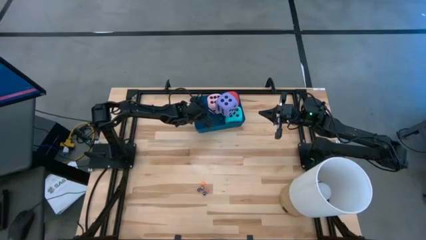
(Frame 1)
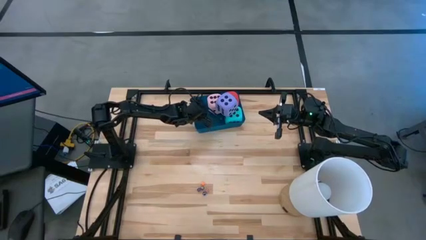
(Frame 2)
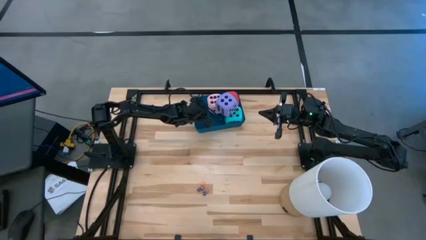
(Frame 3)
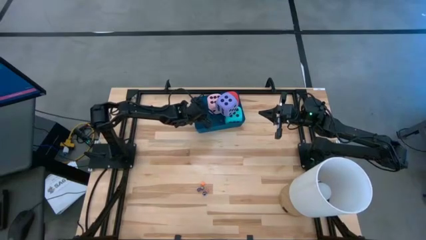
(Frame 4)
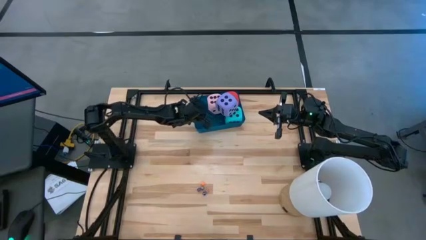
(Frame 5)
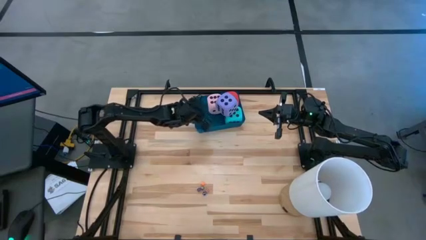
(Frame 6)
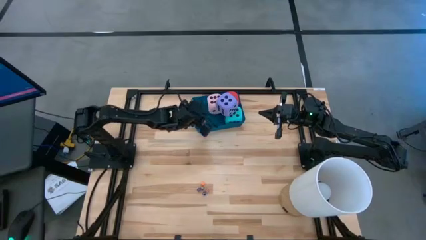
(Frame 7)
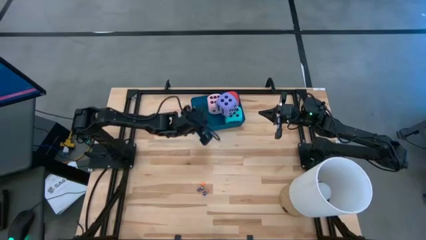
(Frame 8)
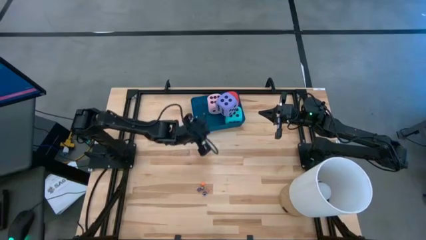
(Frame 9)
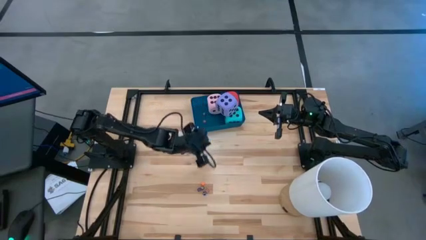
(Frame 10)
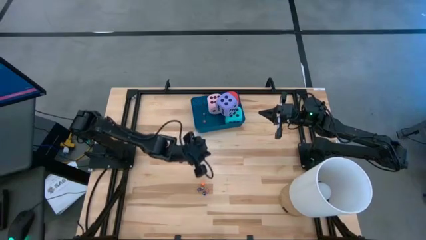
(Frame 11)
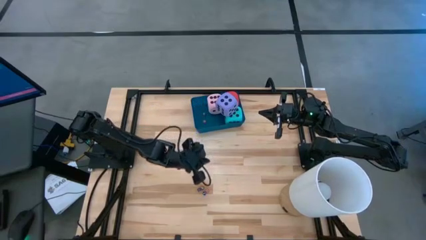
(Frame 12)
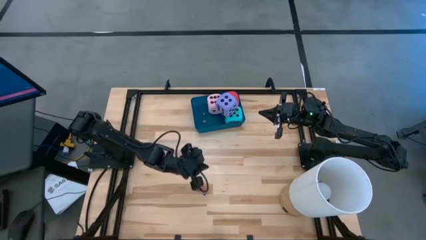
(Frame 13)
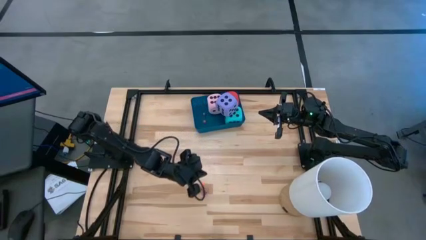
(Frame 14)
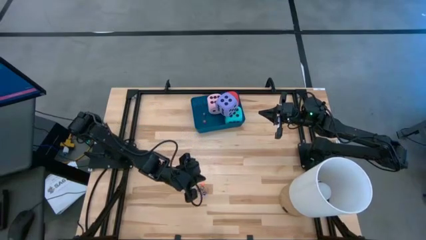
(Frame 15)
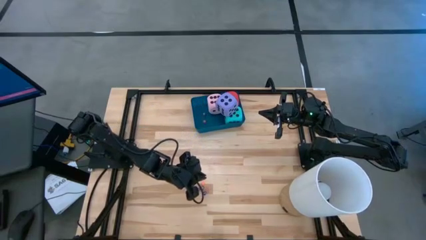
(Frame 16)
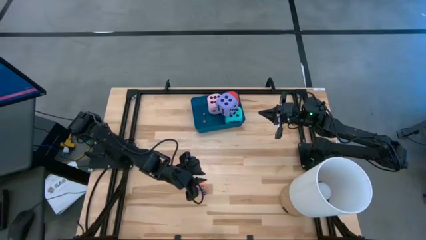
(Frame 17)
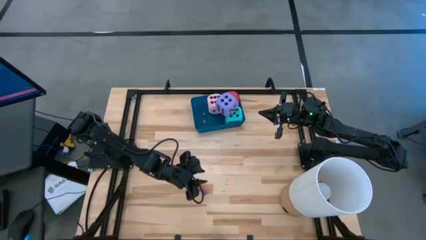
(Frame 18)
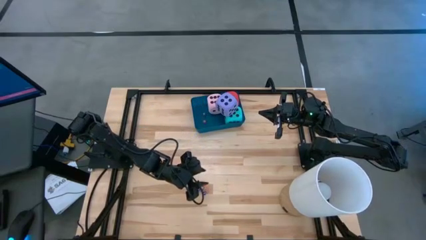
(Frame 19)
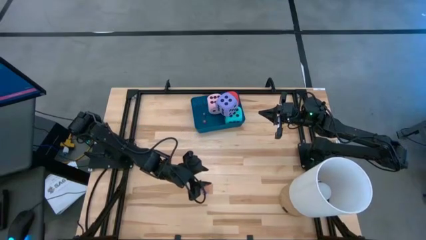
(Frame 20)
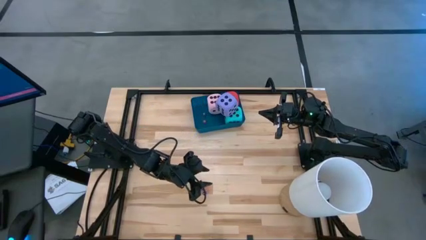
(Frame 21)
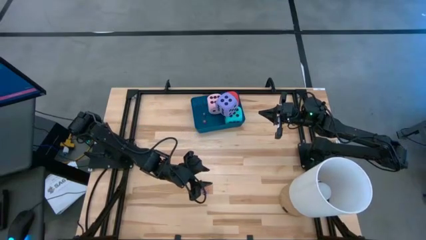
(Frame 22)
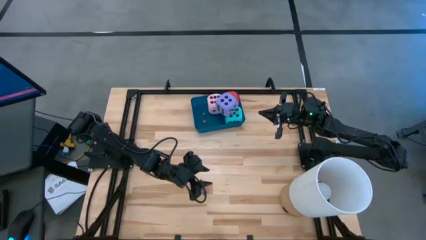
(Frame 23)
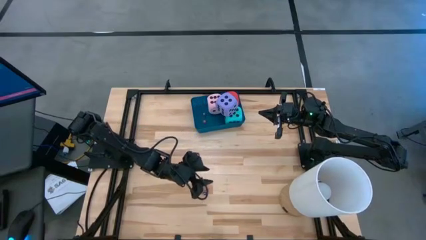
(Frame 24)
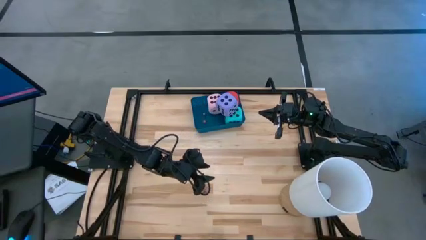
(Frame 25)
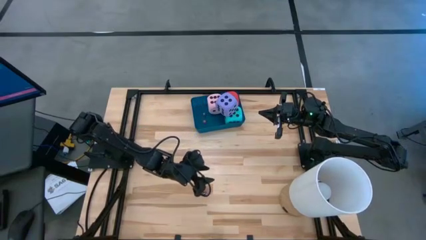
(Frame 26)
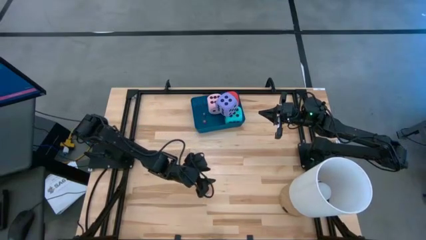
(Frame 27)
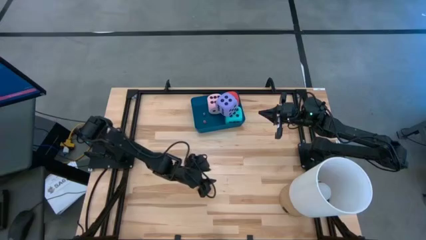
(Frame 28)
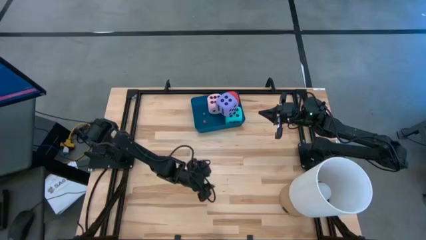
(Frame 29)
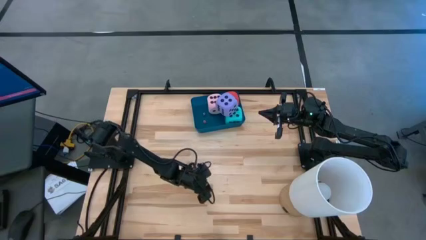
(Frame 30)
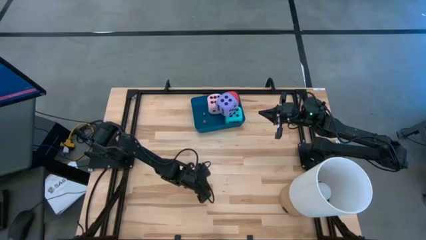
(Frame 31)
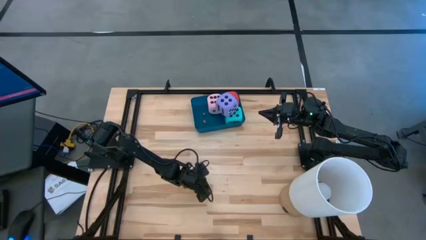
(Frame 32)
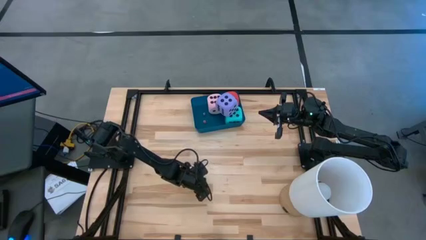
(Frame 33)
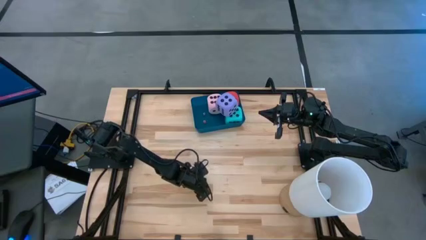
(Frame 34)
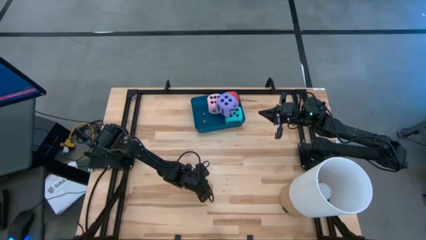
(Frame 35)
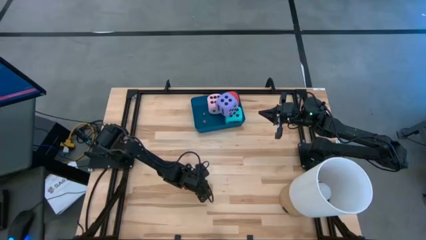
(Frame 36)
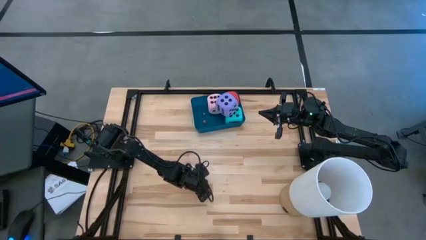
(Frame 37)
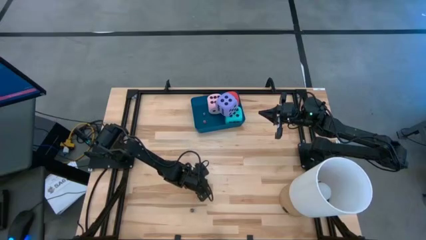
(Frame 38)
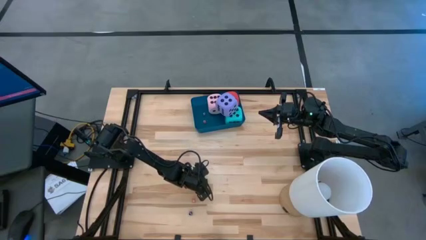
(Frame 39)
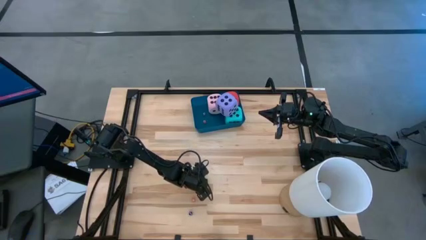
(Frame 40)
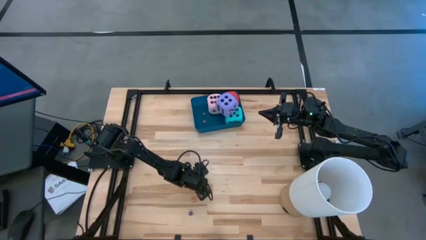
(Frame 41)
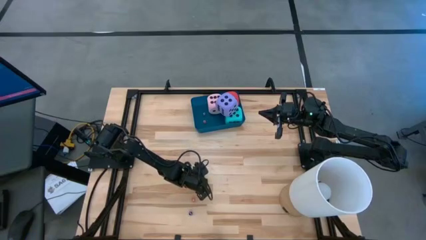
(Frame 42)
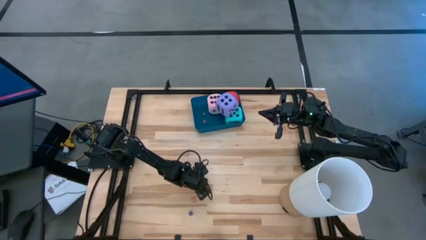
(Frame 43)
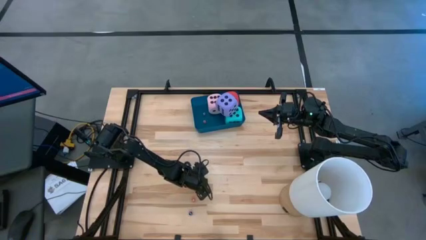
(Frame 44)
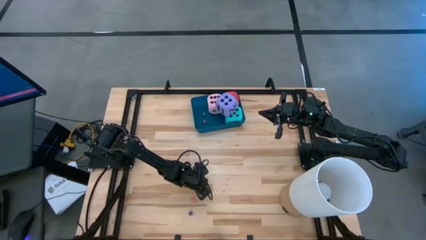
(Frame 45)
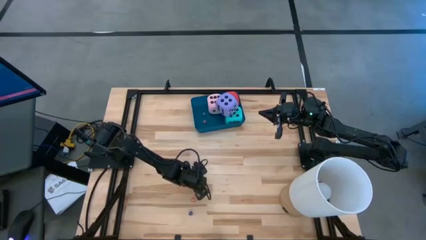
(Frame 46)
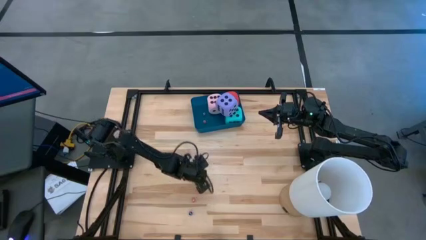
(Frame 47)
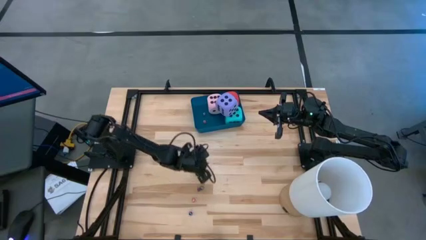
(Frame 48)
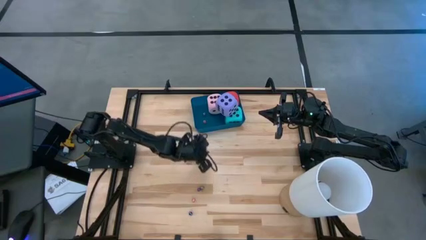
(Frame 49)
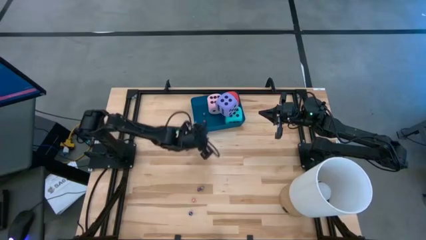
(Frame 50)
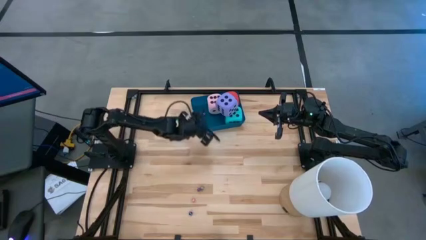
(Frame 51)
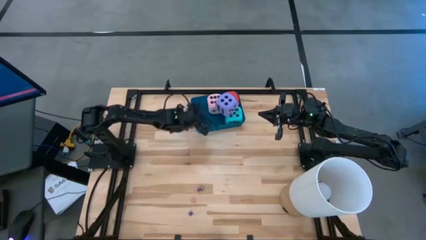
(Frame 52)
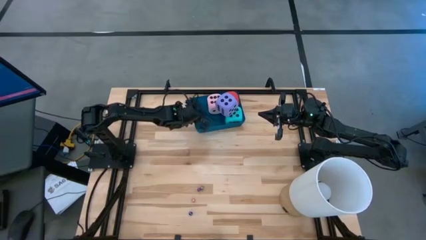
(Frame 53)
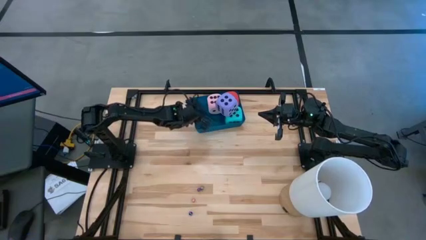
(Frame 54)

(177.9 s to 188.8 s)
Task: Pick & Place Dice
Put the small orange dice into the blue bin
